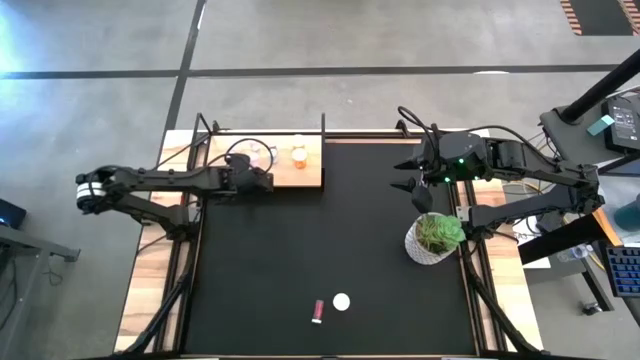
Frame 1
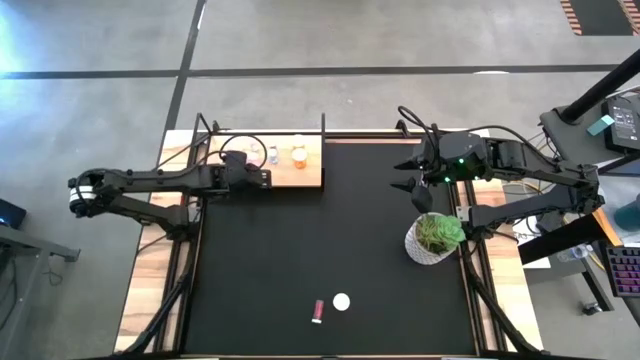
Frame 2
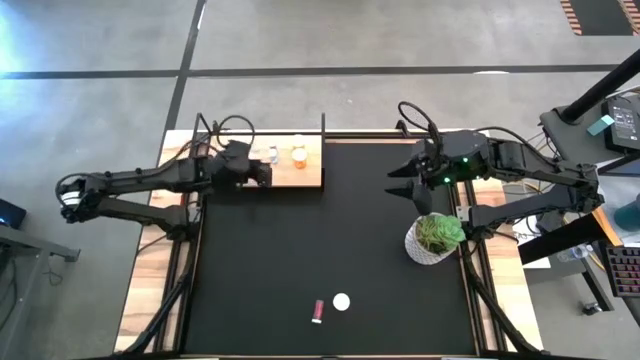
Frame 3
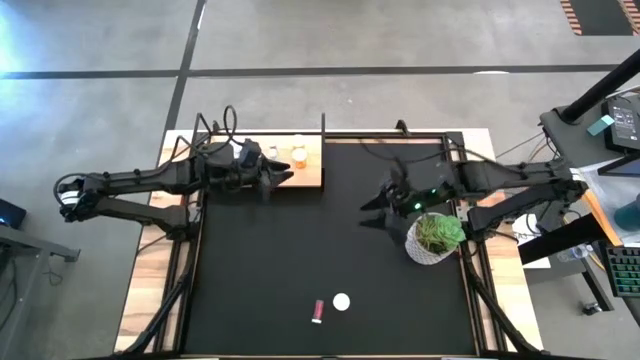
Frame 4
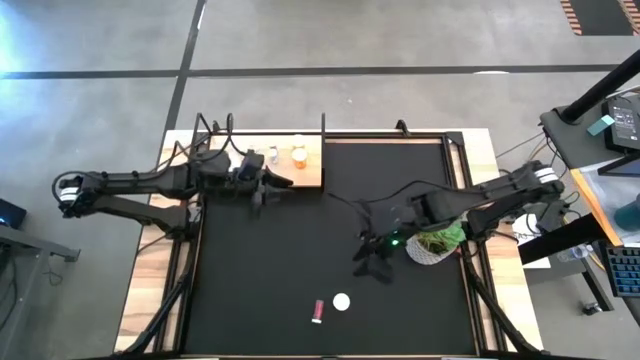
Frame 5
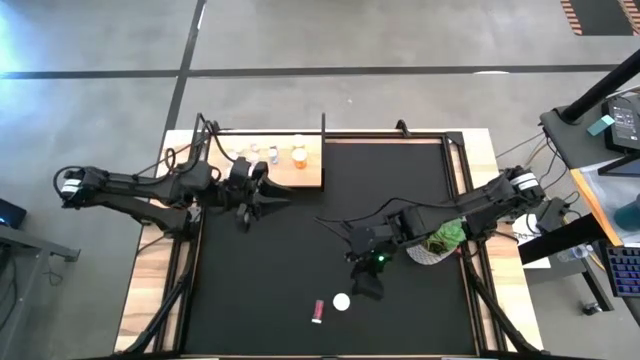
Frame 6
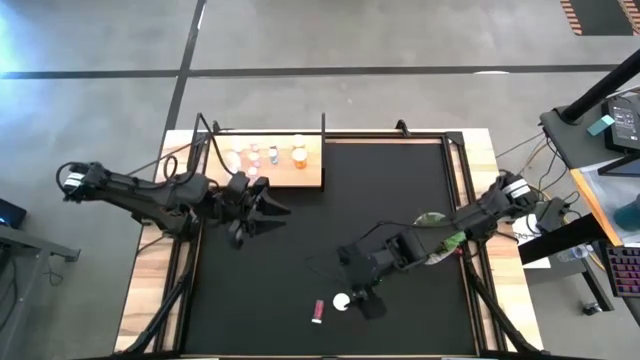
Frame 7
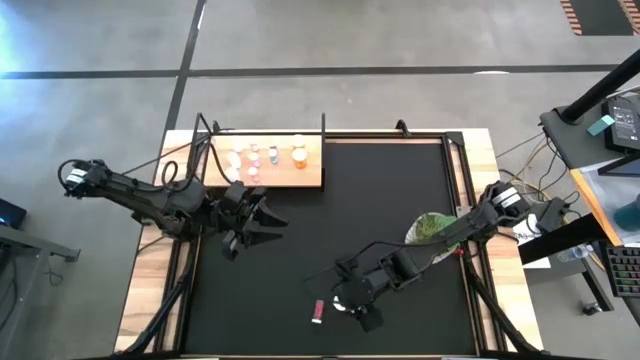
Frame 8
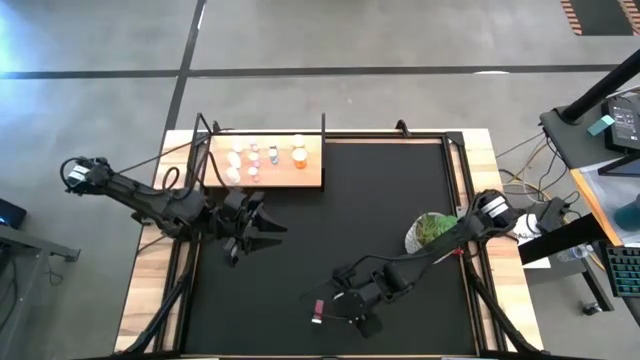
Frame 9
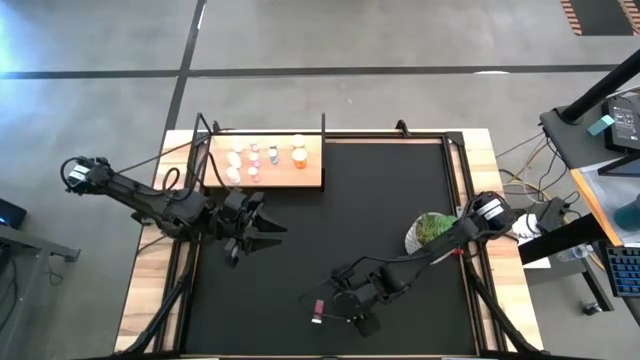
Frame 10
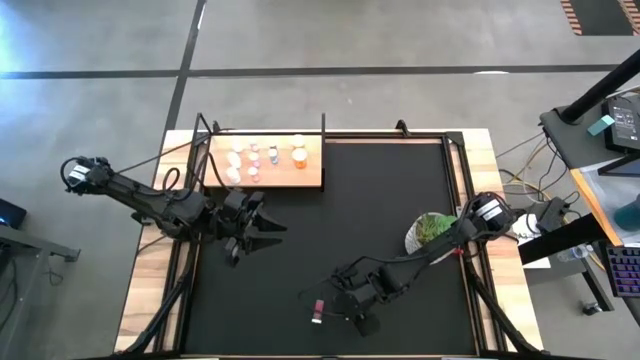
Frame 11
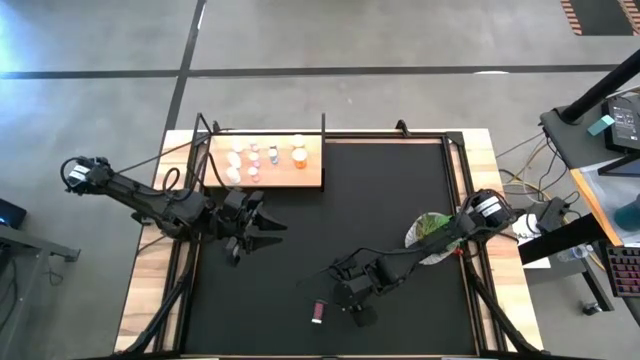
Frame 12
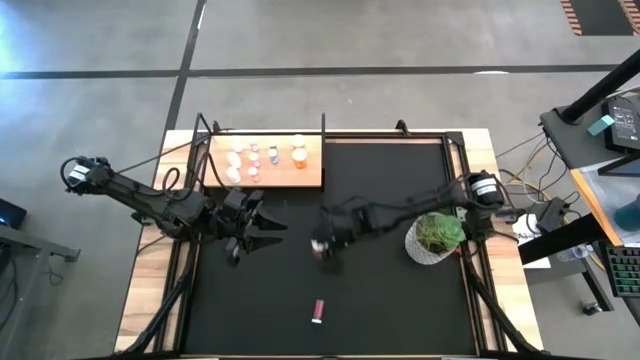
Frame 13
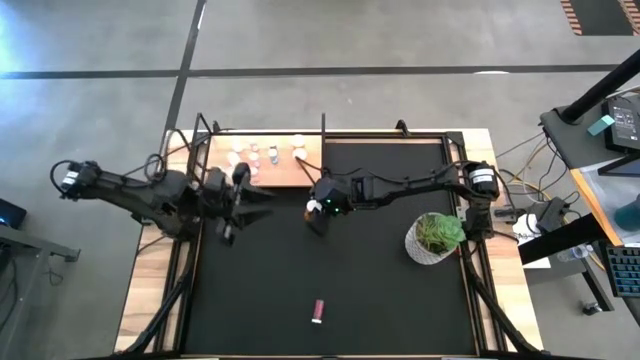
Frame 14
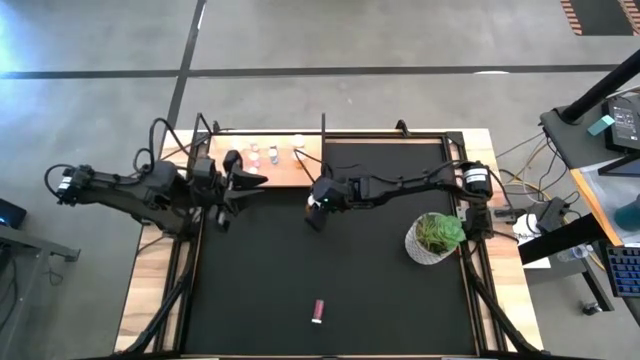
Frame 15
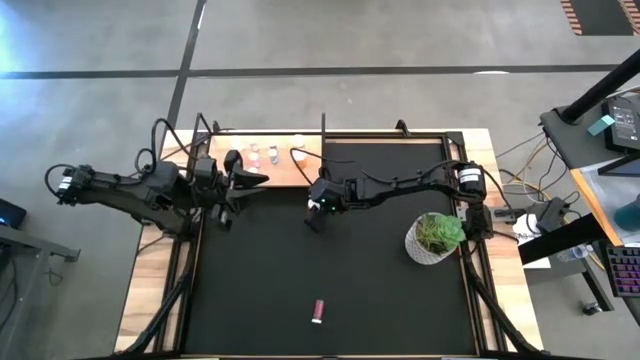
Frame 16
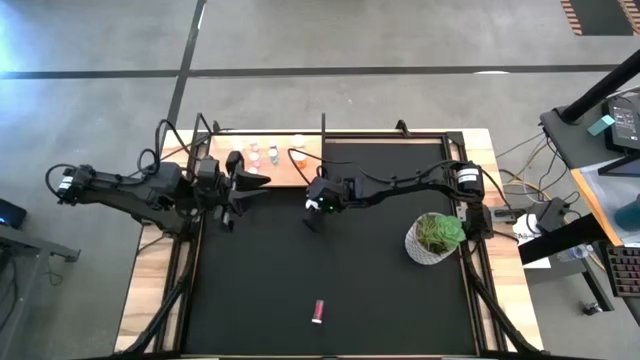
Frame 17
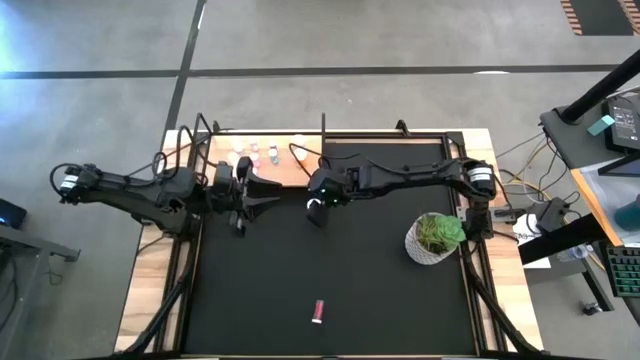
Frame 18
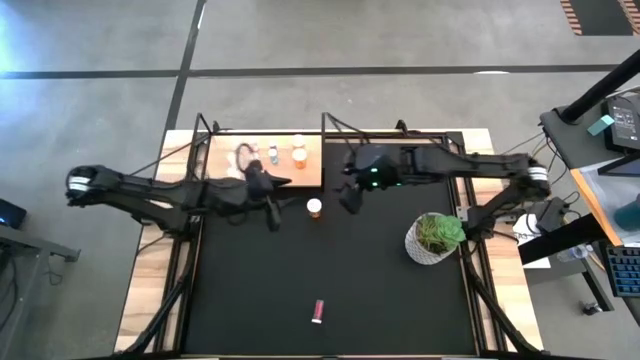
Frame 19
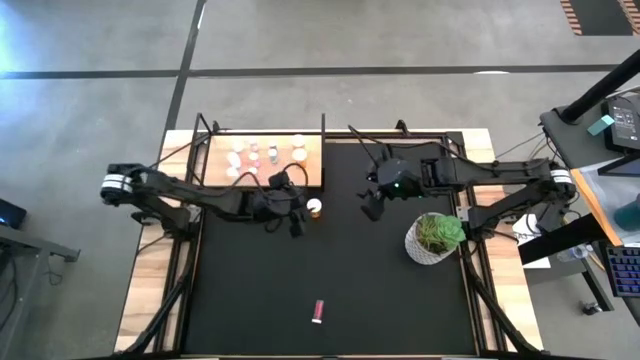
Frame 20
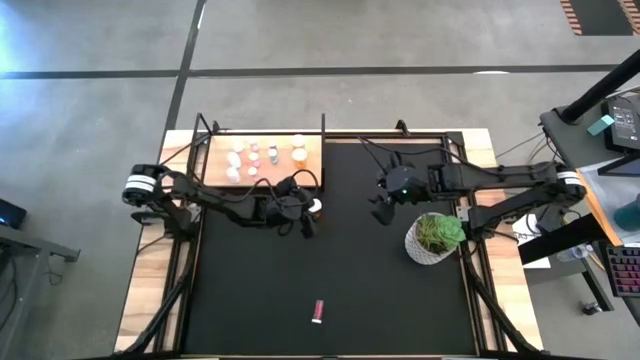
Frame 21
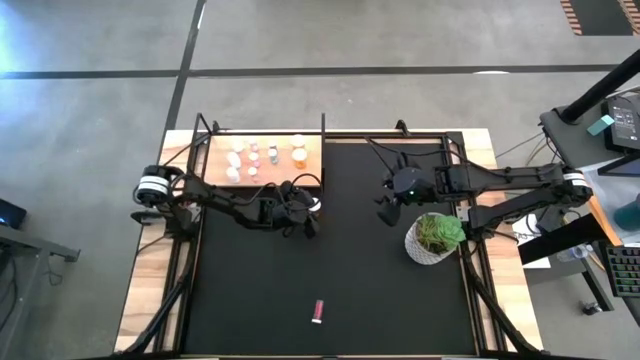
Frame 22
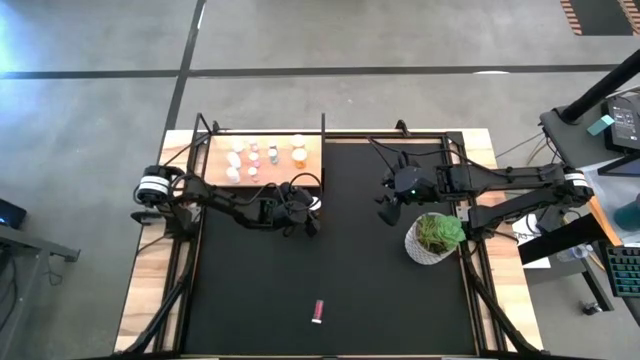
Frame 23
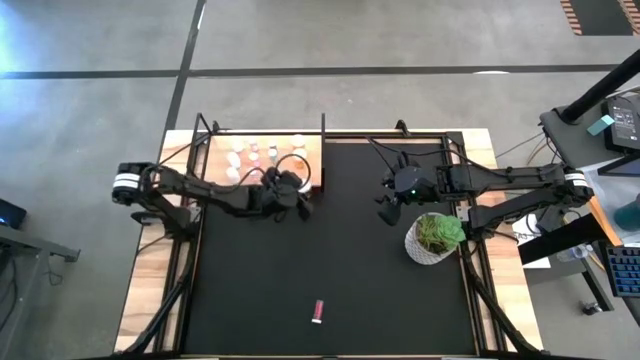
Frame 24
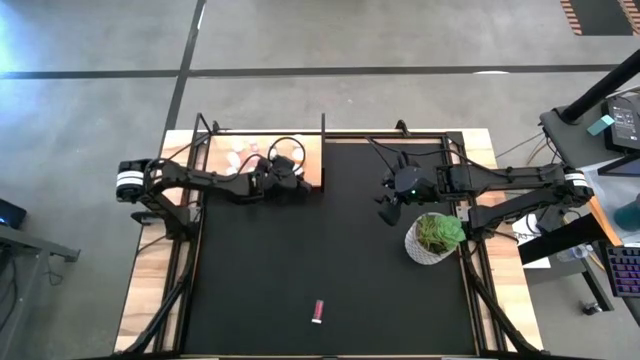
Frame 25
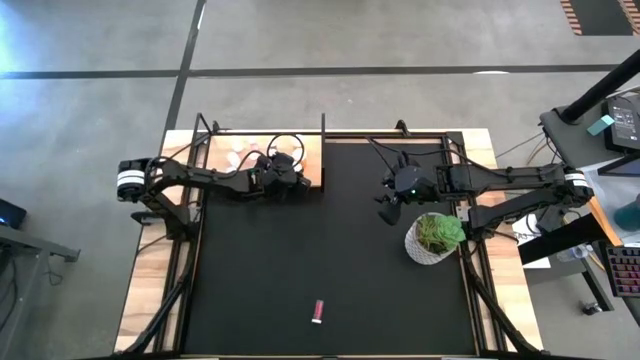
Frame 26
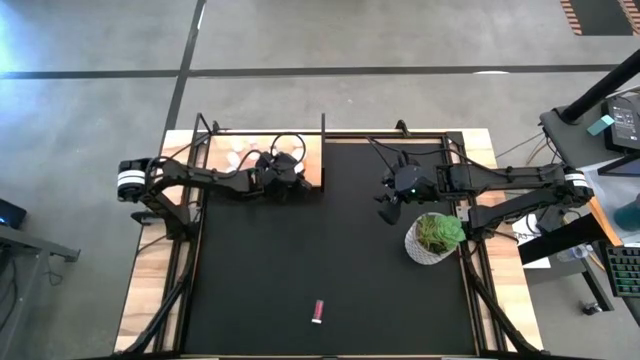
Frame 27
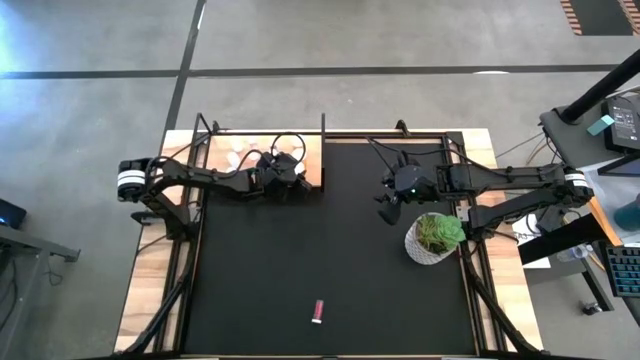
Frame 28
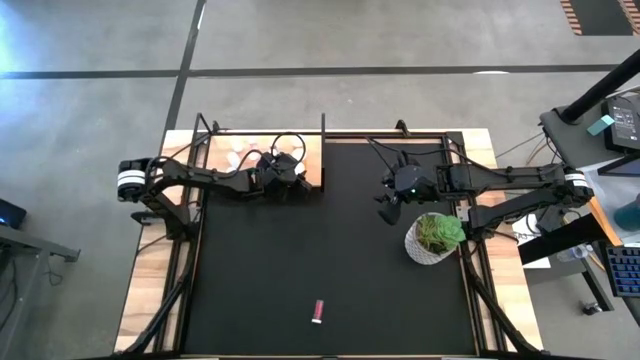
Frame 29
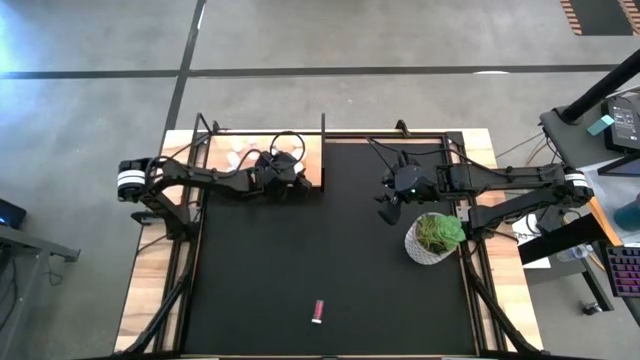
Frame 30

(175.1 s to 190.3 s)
Task: Pick and place medicine bottles onto shelf by color
Put the orange capsule bottle into the shelf

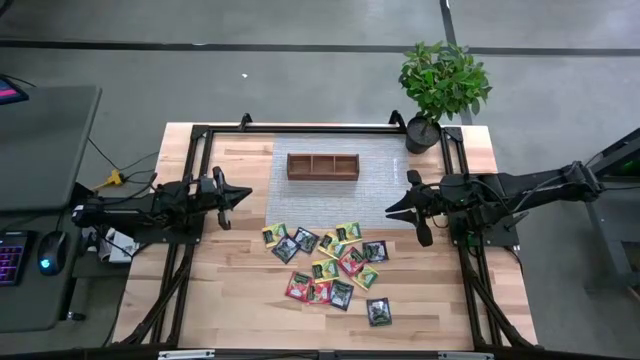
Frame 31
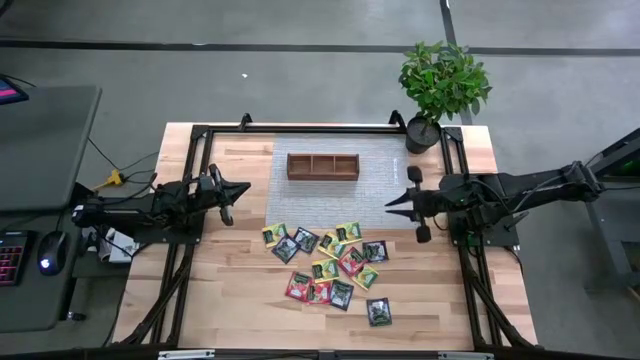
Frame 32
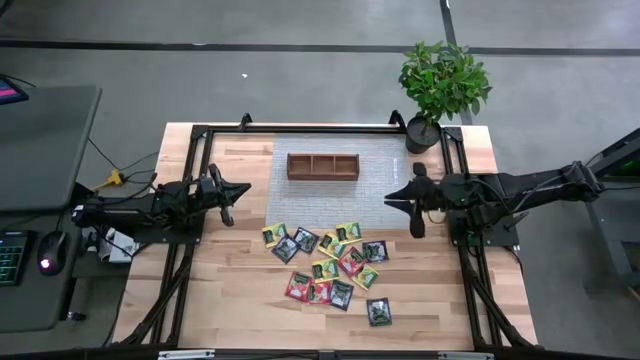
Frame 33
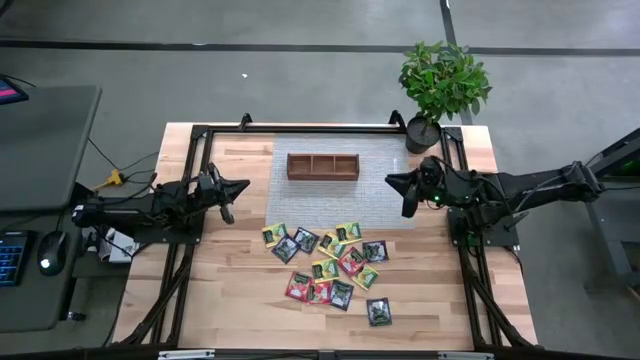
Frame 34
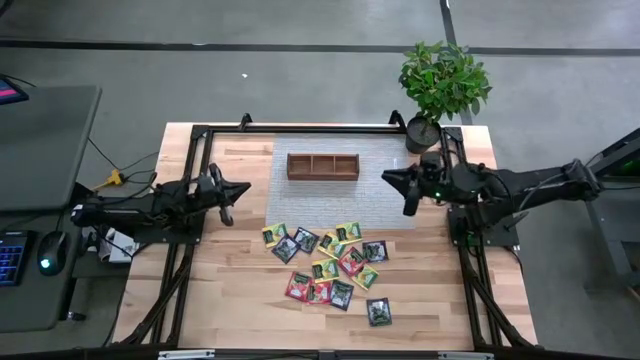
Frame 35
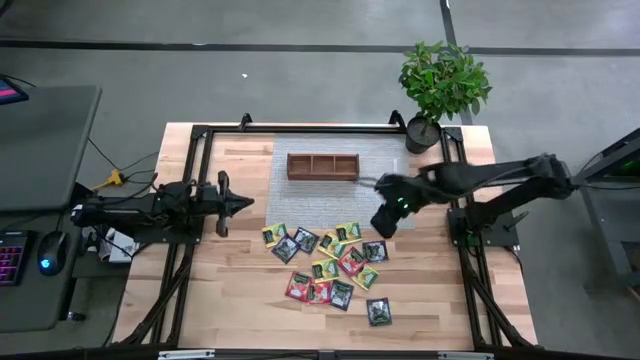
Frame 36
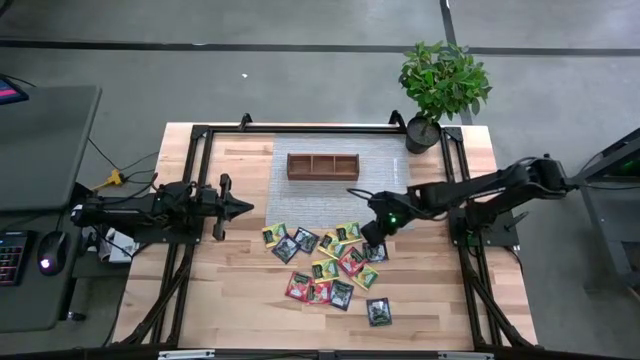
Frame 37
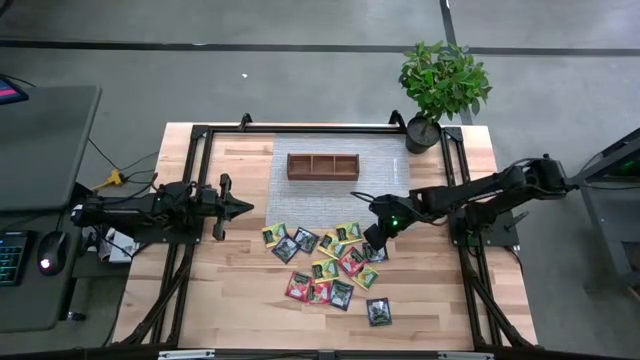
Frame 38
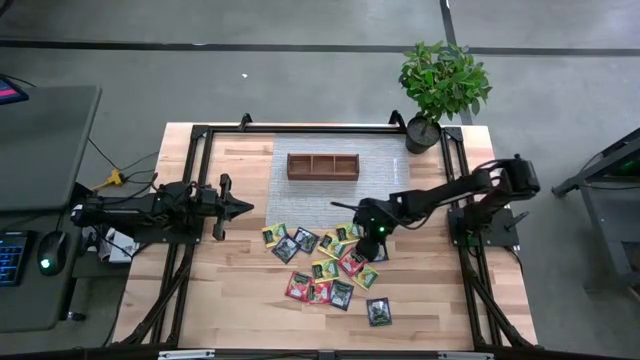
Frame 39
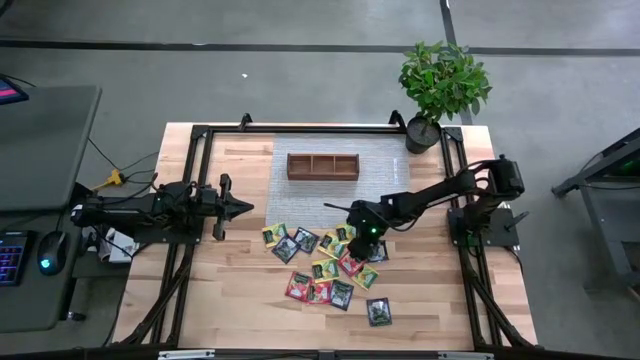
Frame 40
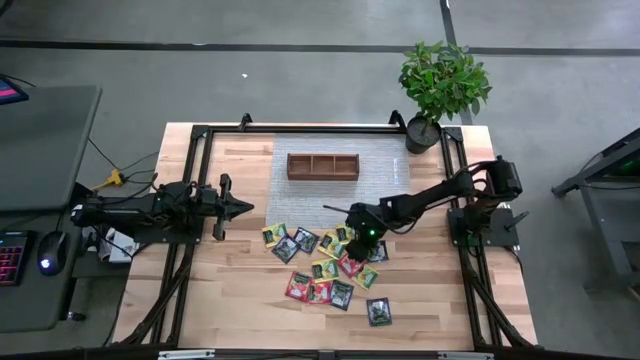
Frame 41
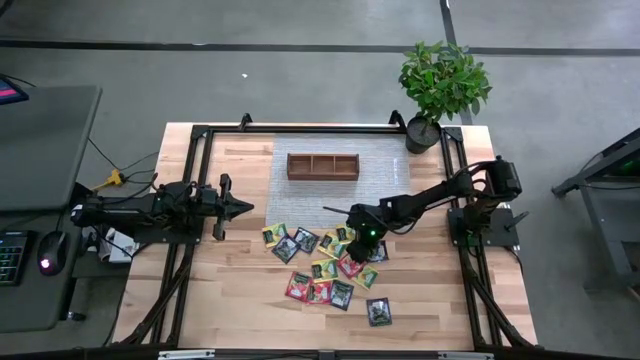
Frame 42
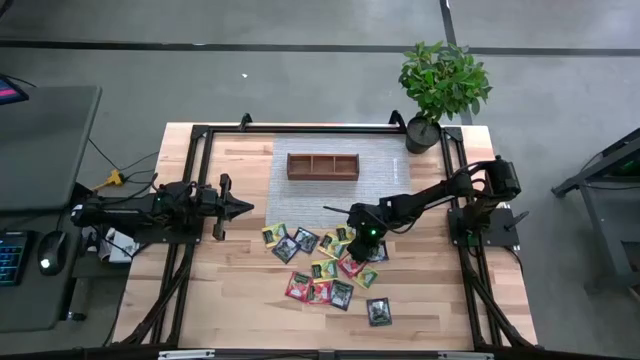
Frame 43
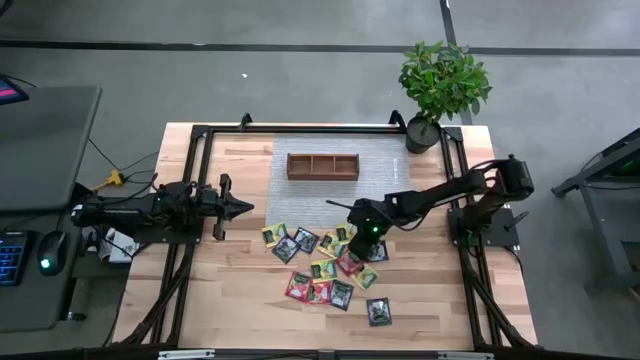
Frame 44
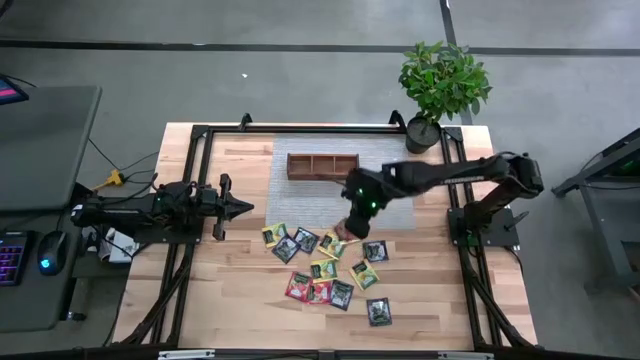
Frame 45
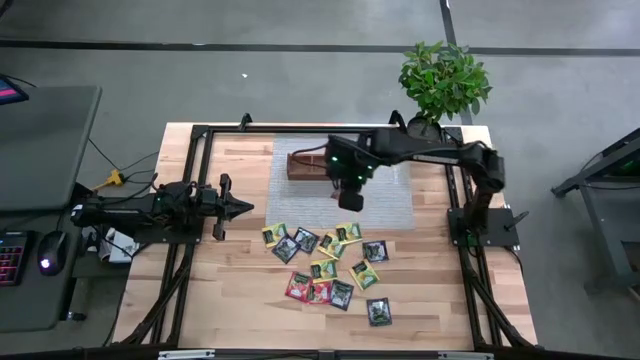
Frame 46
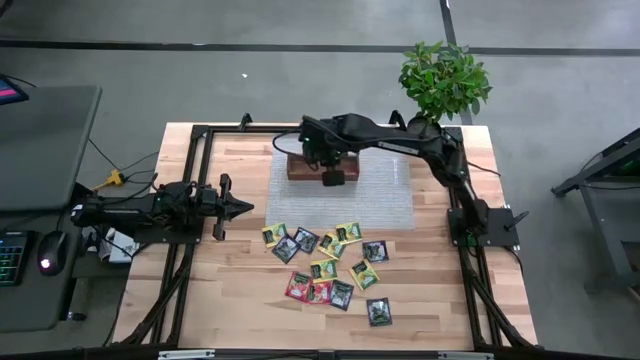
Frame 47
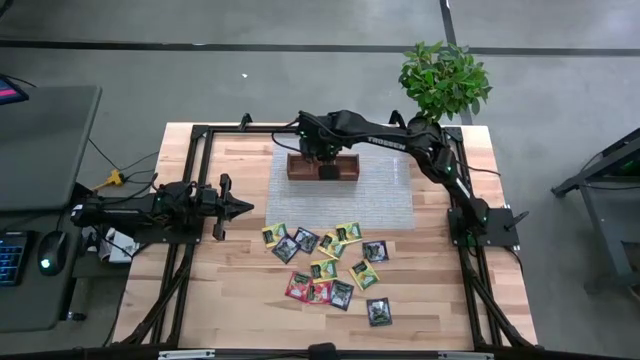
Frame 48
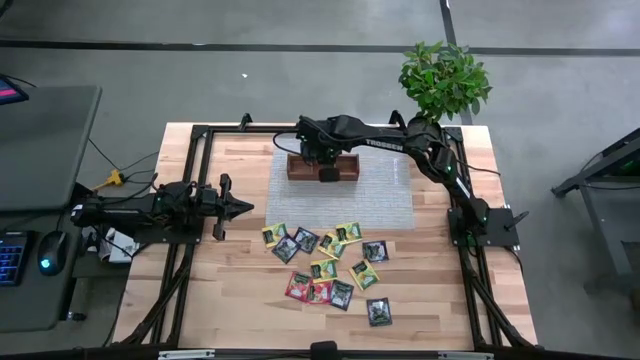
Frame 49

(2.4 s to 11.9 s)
Task: Pick & Place Tea
Put the red tea bag into the middle section of the wooden organizer
